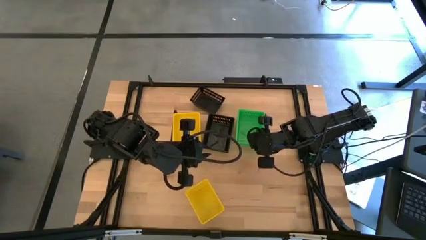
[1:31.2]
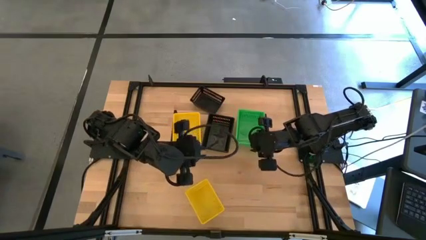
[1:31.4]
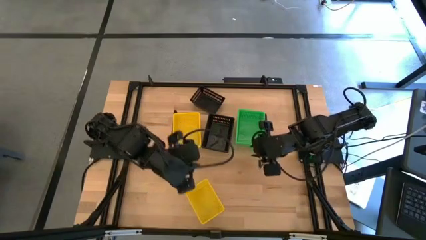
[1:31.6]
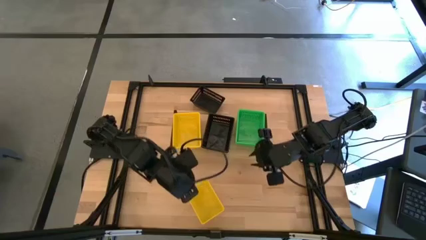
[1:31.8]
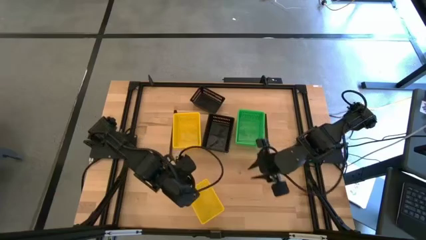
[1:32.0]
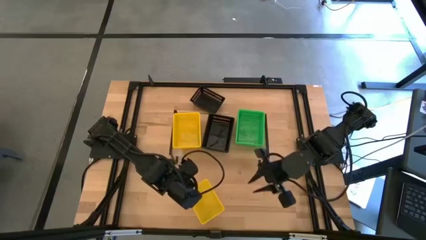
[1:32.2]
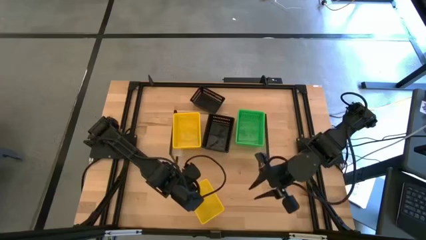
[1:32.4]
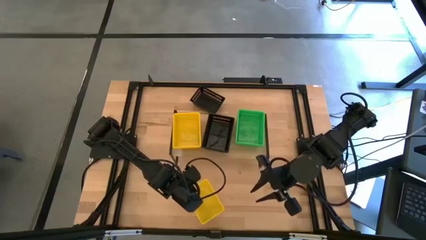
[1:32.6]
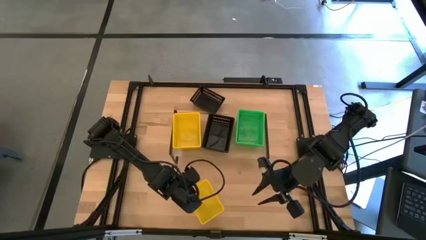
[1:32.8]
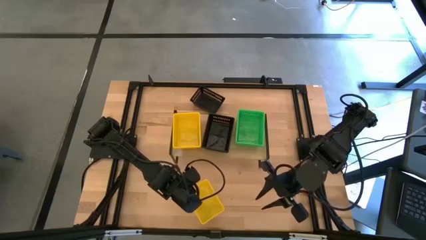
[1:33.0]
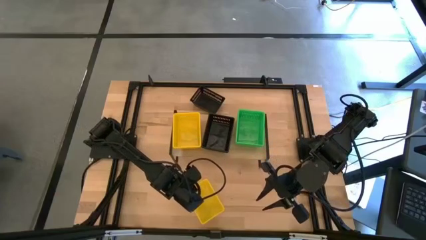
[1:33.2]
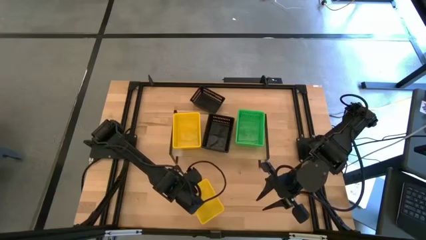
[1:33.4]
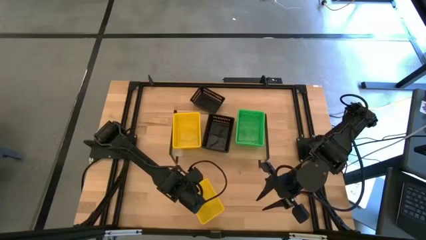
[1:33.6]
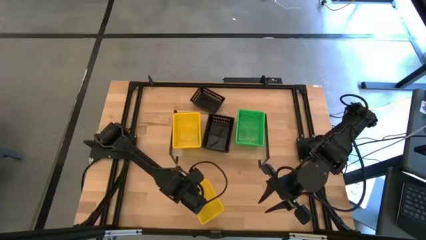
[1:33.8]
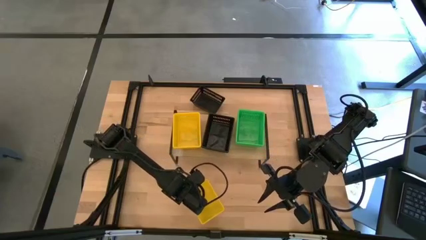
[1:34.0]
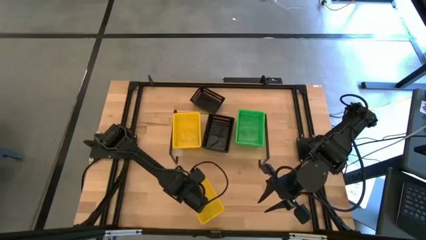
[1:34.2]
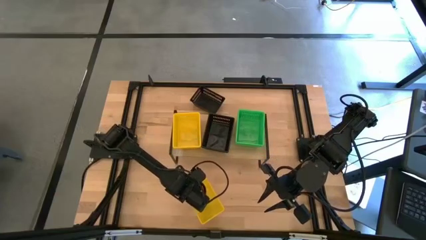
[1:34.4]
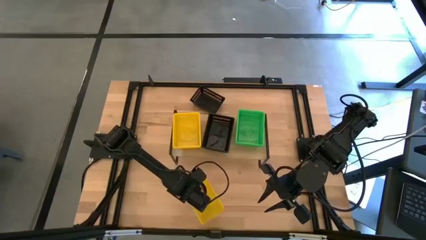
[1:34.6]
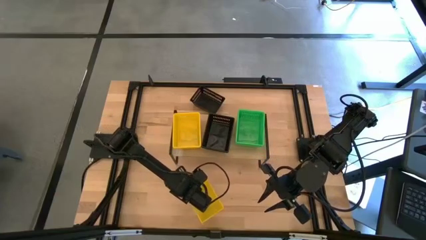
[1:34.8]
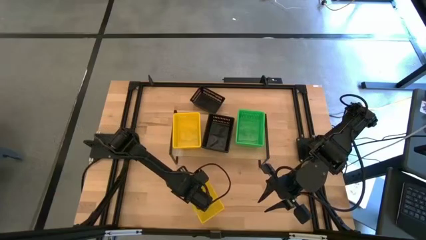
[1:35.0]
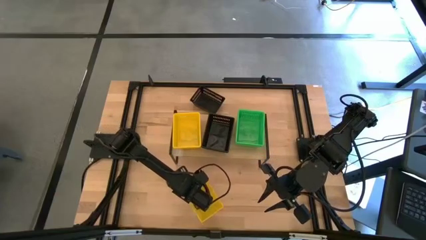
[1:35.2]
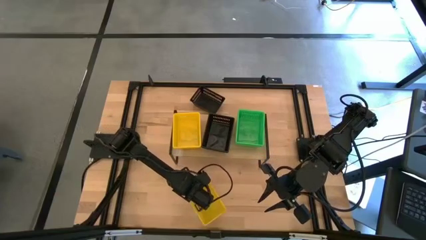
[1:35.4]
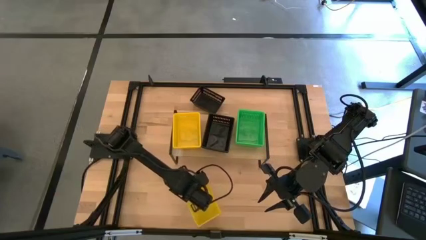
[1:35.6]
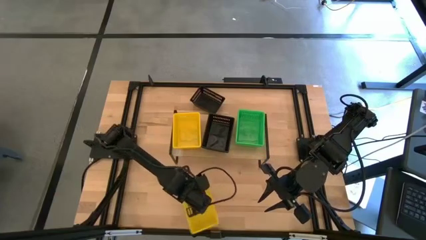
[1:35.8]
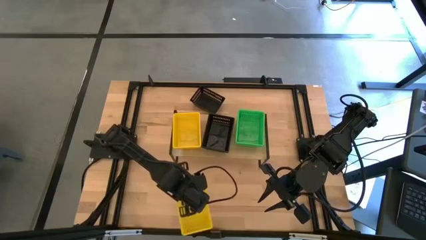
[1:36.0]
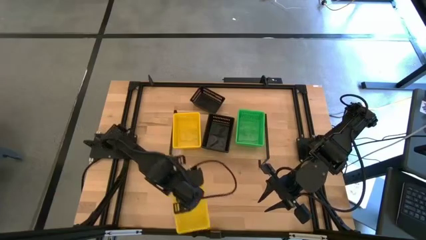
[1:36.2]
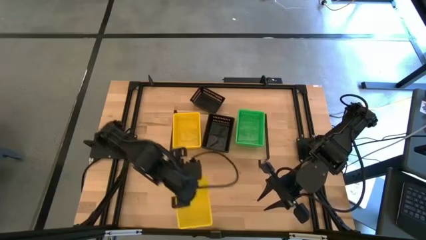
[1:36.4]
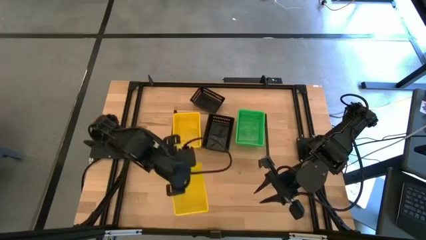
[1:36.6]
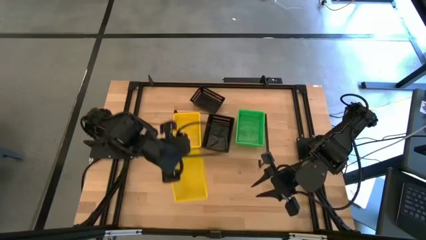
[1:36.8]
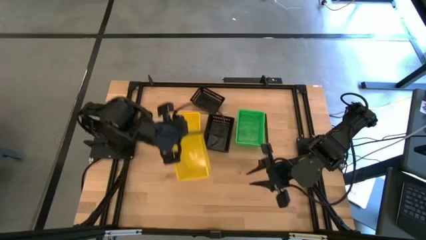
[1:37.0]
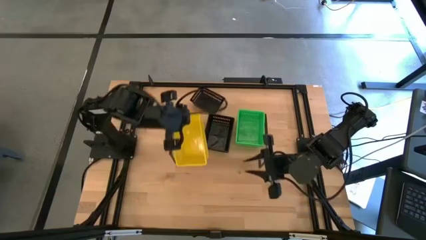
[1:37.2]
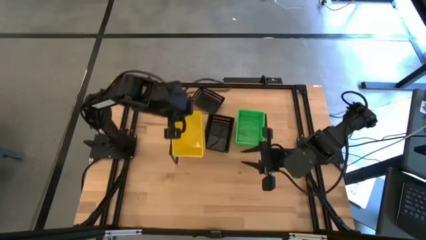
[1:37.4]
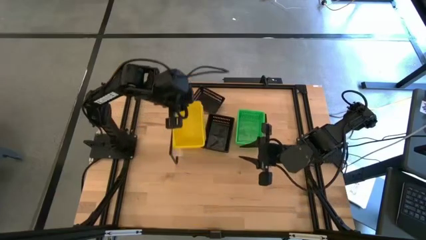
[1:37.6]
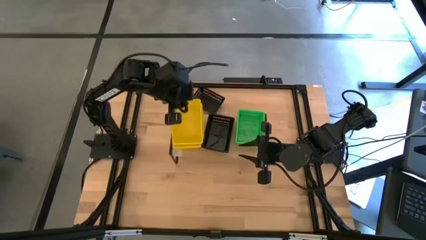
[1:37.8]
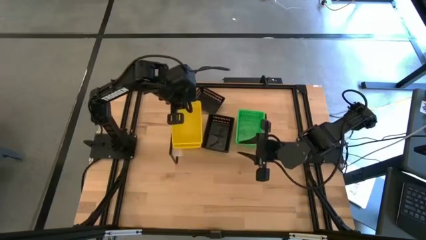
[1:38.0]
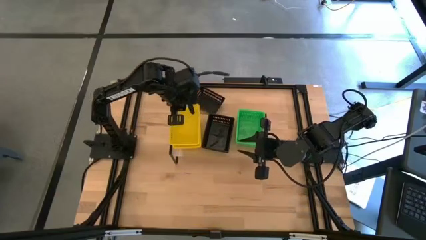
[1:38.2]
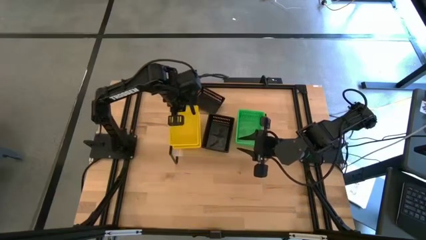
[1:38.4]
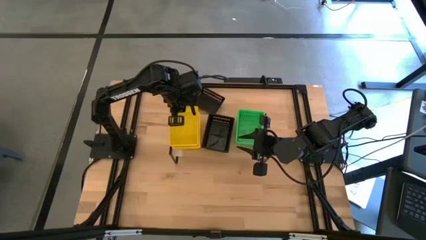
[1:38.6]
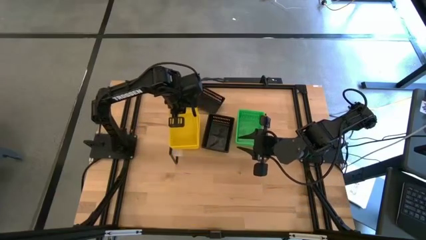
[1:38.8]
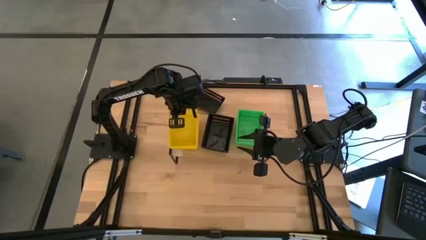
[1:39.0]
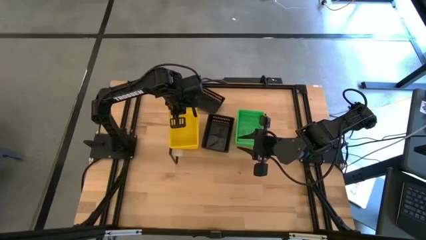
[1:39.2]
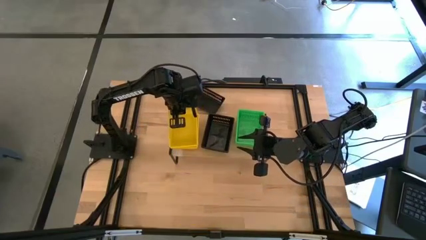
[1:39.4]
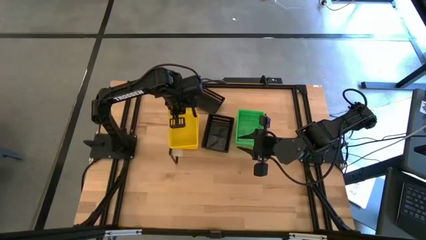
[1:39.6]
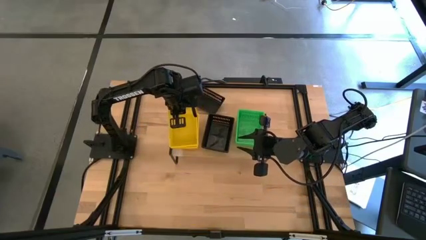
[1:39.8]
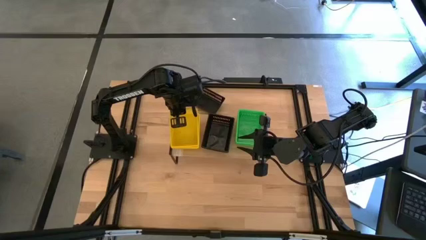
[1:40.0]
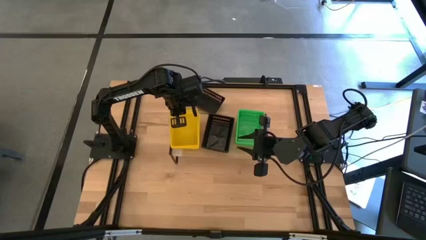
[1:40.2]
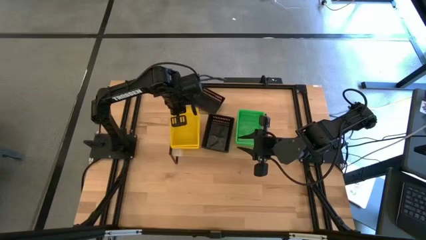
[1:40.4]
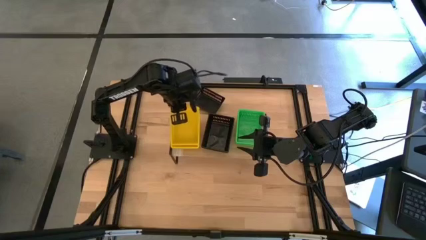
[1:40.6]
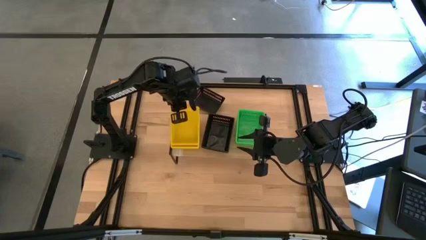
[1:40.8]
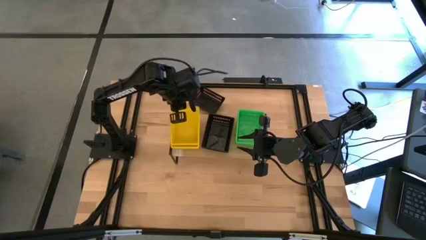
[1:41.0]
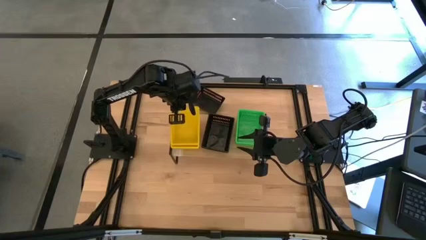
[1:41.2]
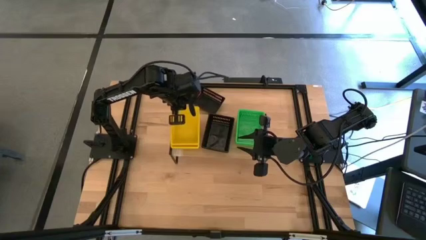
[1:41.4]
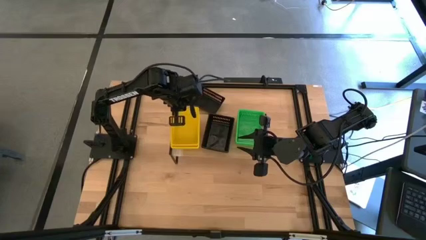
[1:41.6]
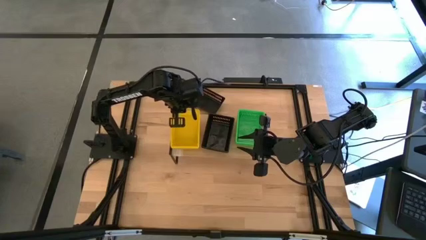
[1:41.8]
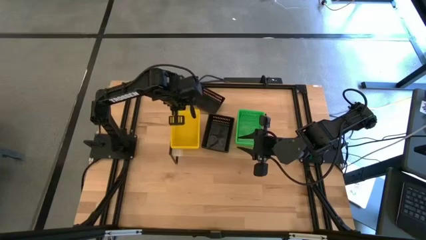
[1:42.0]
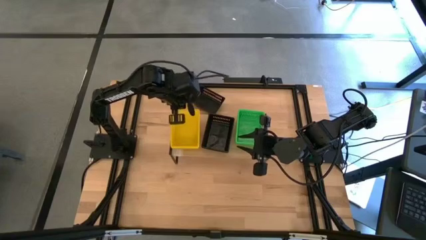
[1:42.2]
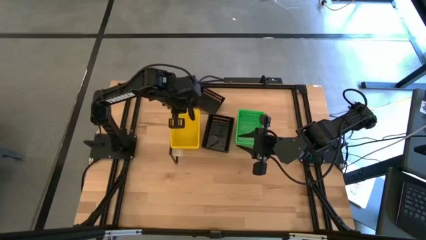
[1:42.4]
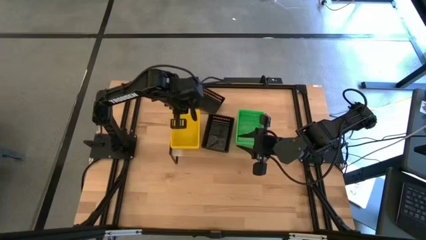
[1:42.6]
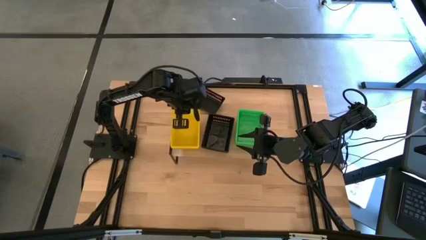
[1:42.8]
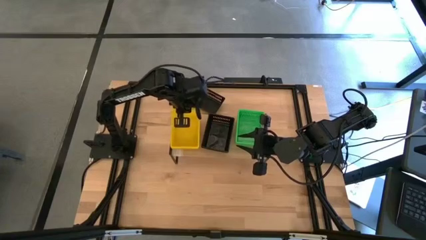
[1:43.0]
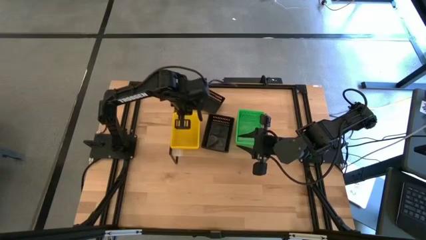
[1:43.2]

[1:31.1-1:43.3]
Task: Stack baskets on shelf by color
Stack the yellow bin on the stacked yellow bins on the shelf

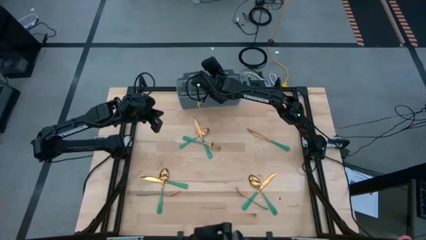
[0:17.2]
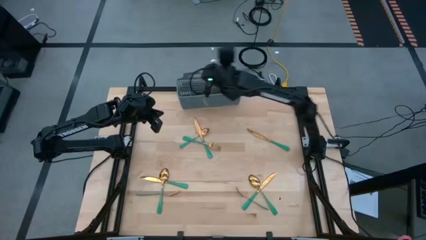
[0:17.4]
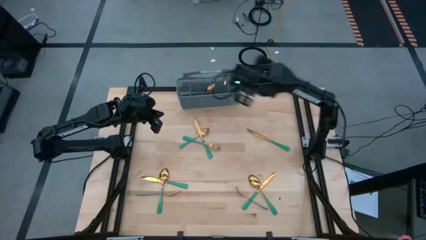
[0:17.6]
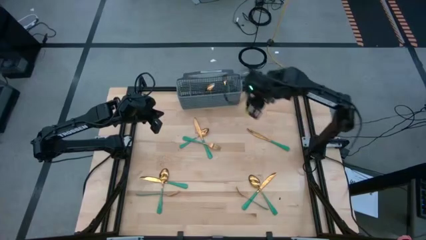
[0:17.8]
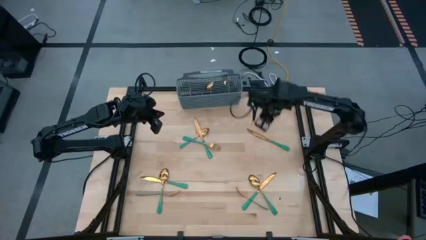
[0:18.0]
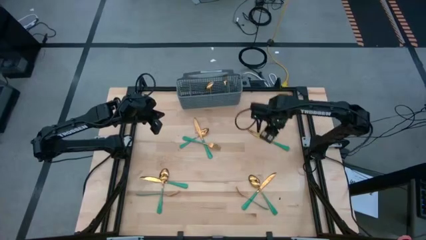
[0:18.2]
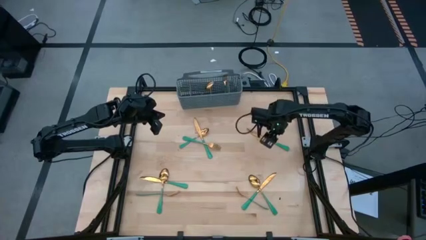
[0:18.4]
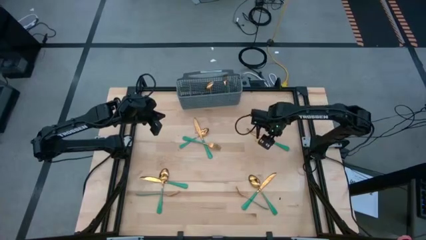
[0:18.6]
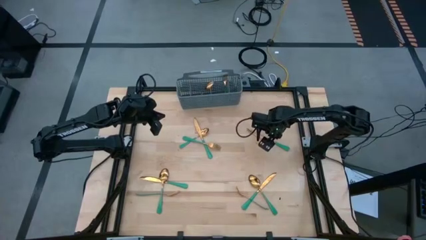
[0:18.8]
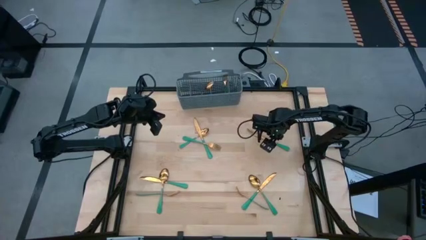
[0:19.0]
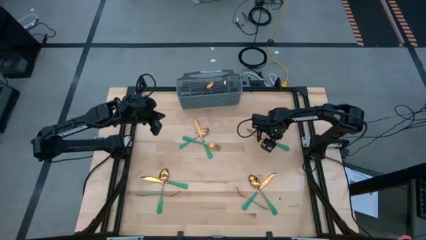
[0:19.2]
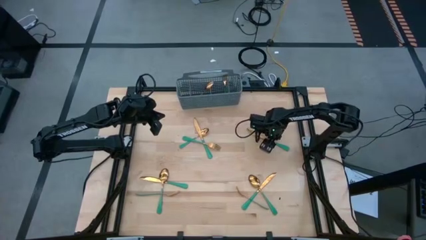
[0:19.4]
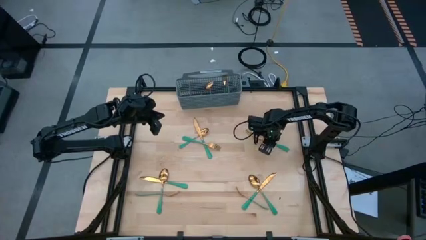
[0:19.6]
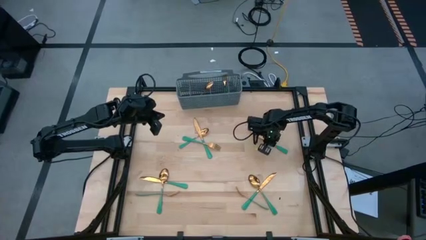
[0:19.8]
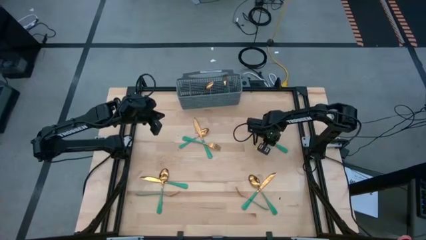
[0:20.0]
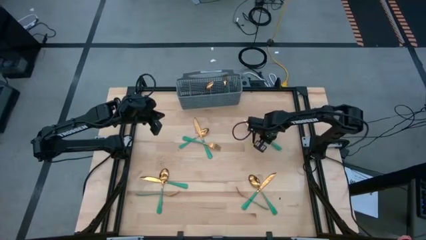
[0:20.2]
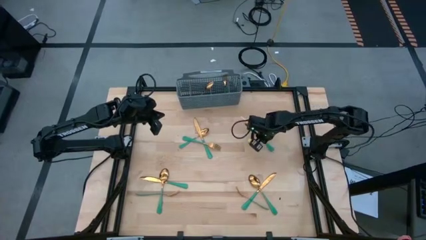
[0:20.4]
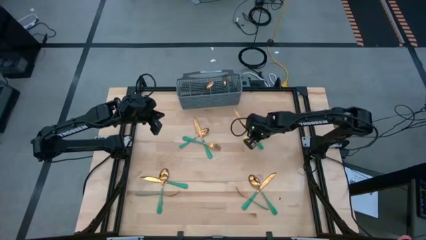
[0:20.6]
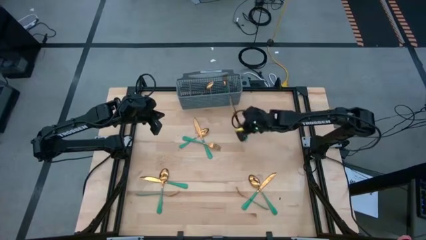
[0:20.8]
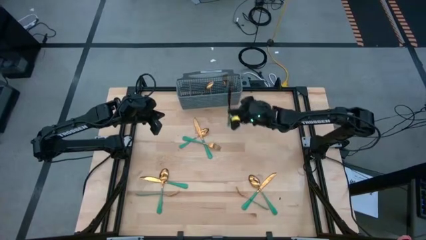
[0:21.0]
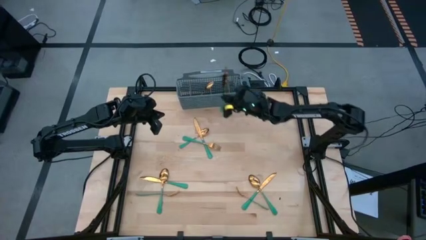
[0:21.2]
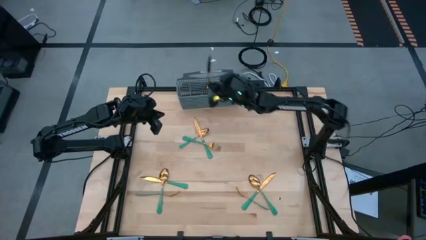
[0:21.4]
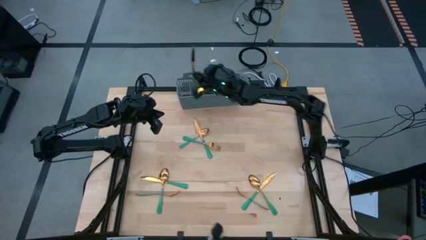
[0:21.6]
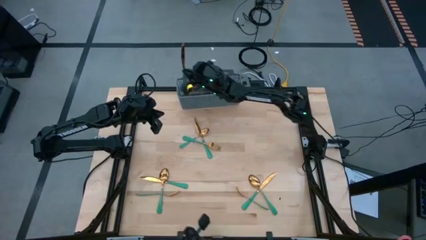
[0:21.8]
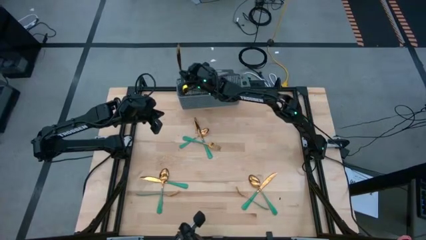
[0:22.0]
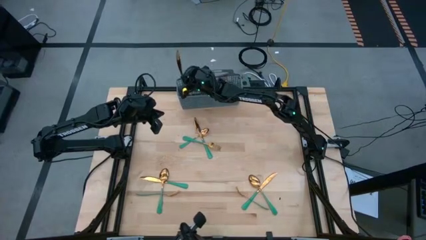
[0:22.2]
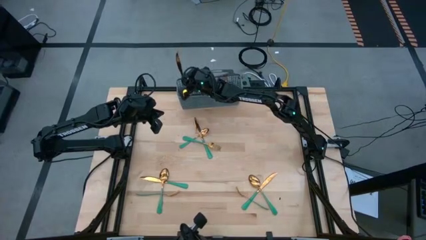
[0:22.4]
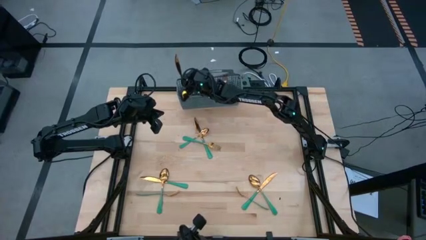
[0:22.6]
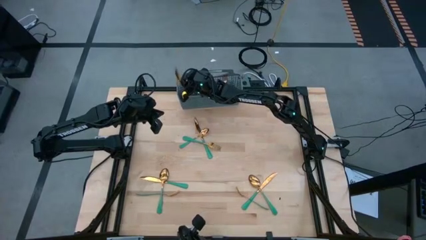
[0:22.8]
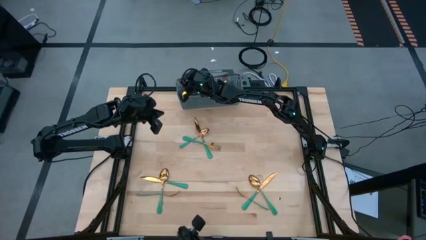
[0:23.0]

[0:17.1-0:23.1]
Task: Sort silverware
Put the green knife into the gray bin
